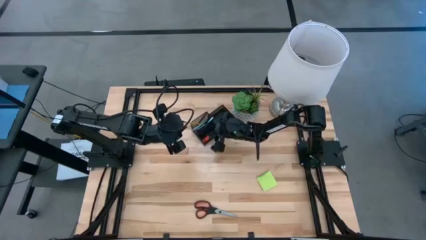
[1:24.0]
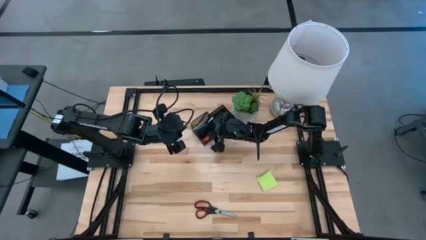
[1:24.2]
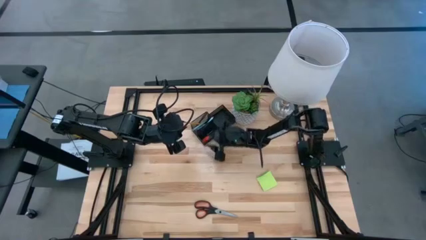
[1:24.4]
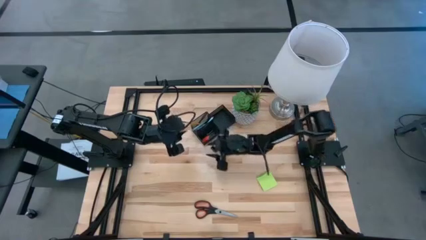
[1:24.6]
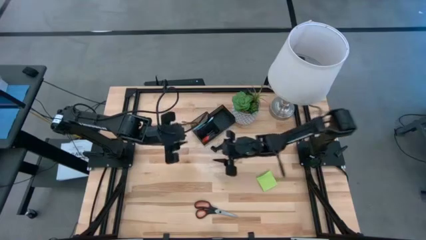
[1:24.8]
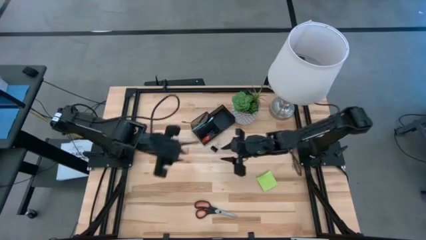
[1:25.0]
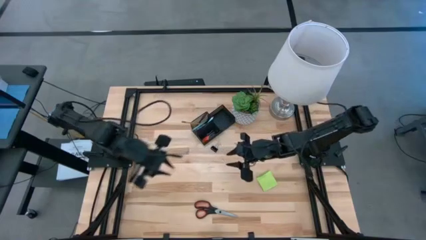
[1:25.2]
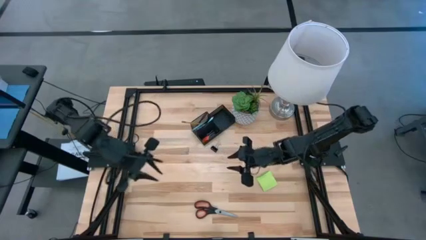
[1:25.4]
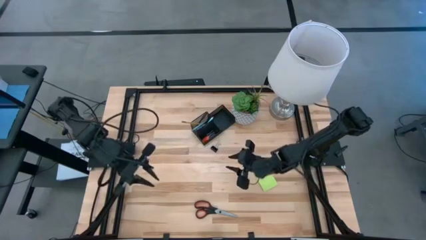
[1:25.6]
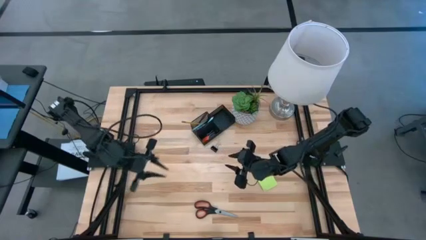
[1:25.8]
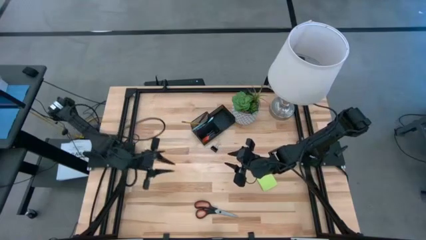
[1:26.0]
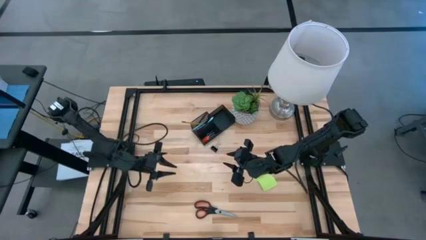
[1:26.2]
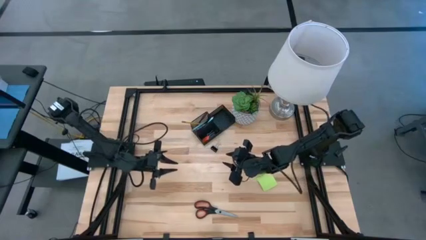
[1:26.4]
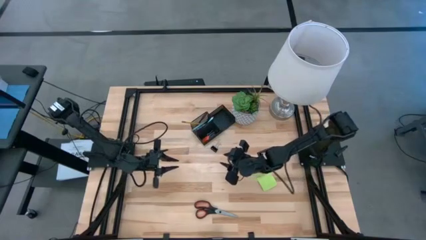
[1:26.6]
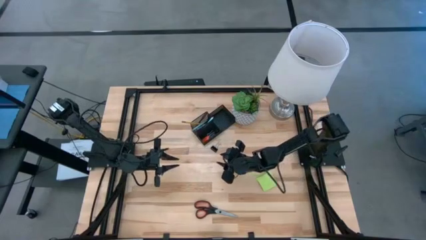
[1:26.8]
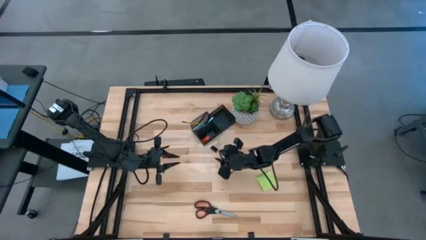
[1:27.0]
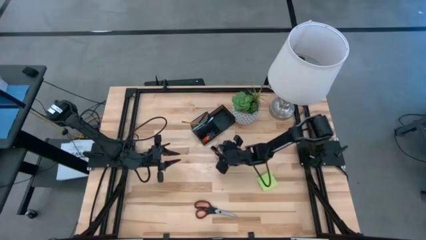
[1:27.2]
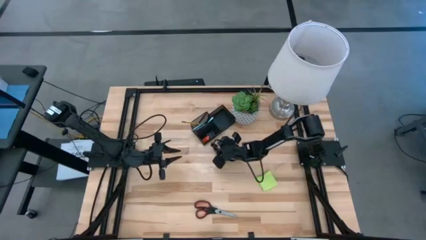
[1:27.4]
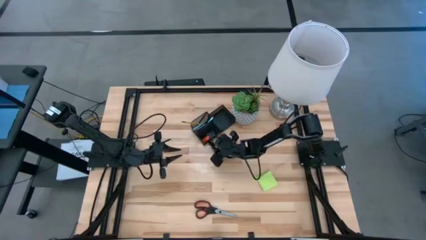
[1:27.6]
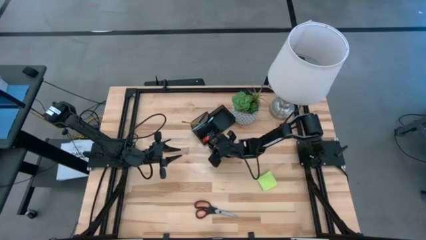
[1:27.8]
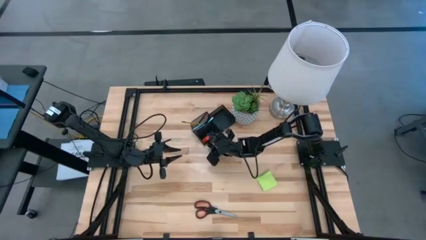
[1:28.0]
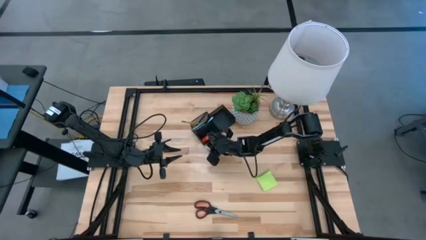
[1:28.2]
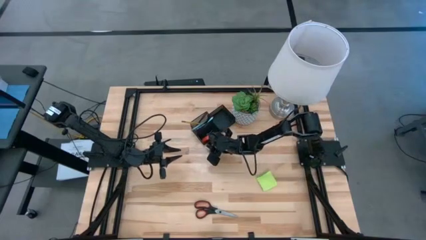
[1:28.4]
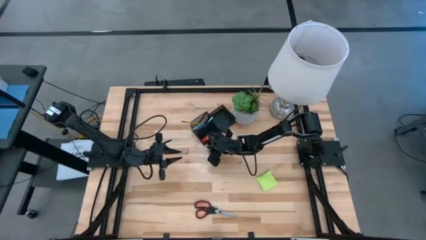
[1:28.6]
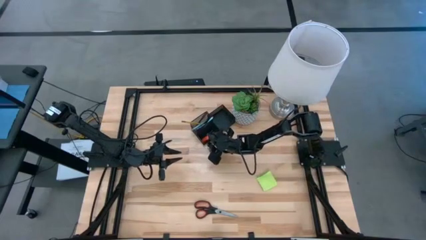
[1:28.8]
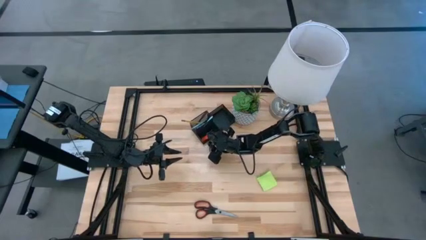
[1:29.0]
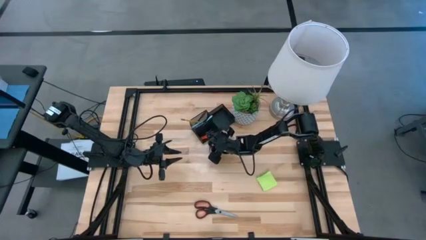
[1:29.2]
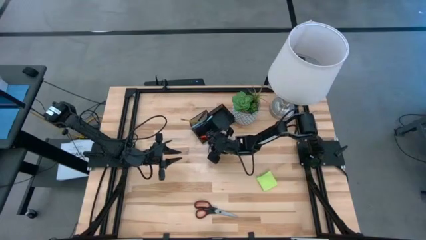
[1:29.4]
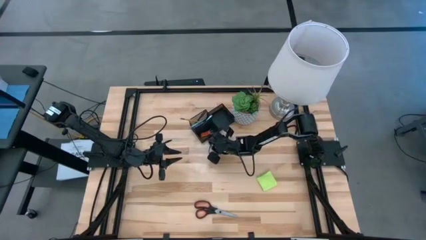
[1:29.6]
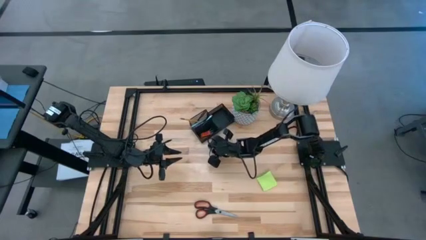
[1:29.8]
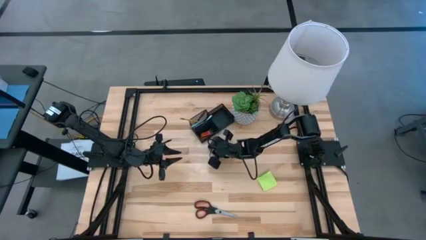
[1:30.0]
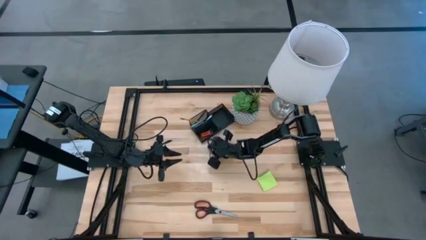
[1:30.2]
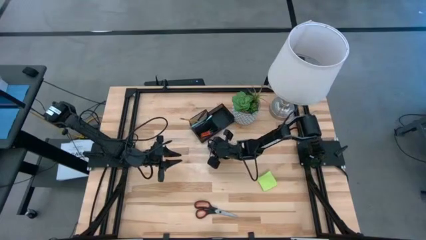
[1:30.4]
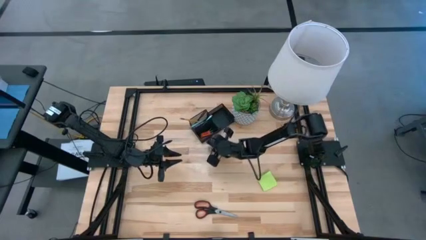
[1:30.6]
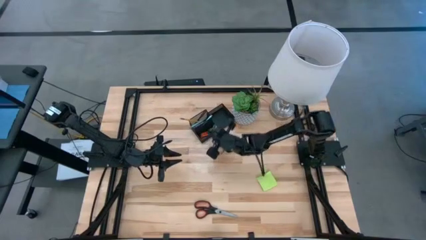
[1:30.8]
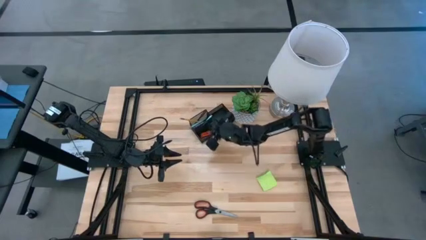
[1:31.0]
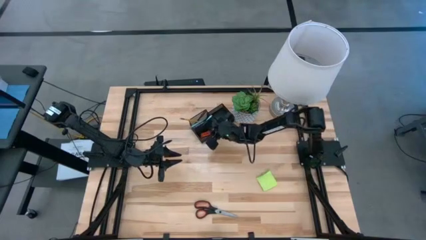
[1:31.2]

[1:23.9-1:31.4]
Task: Pick and place office supplies into organizer
Put the black binder clip into the black desk organizer

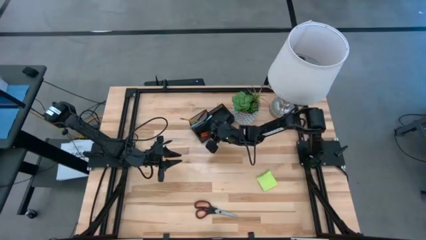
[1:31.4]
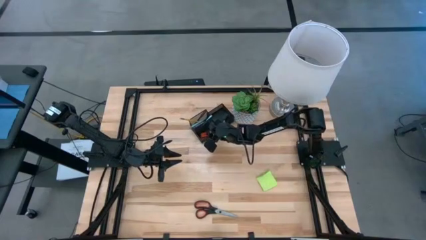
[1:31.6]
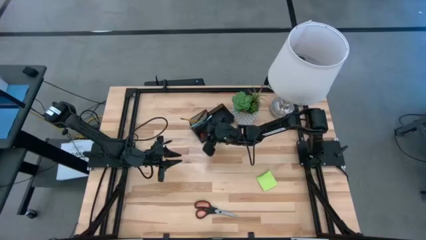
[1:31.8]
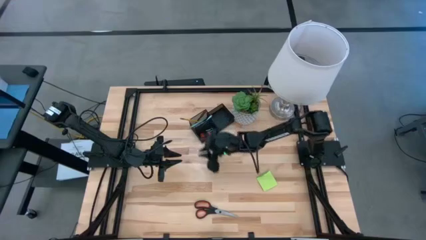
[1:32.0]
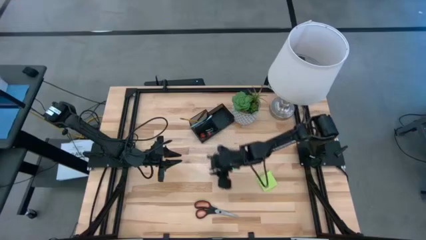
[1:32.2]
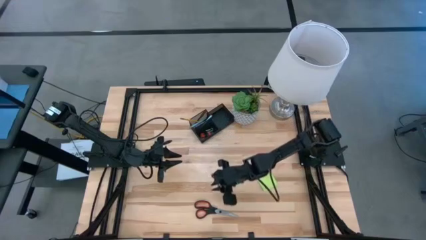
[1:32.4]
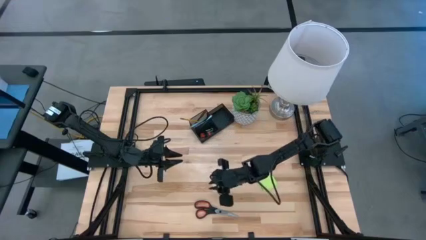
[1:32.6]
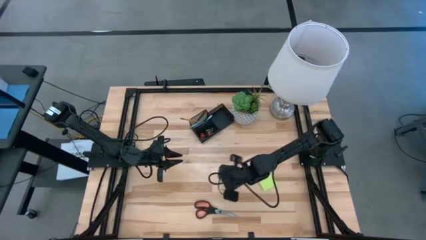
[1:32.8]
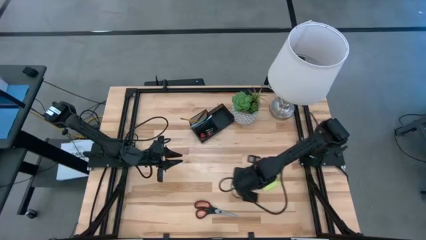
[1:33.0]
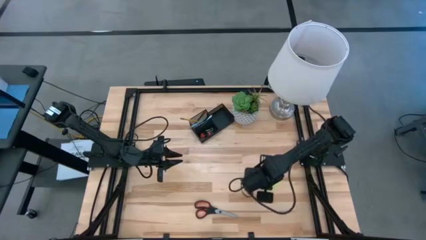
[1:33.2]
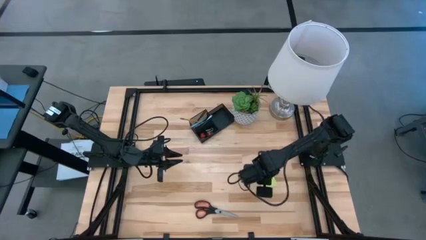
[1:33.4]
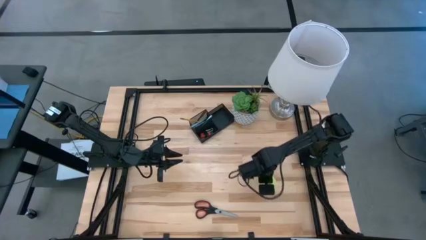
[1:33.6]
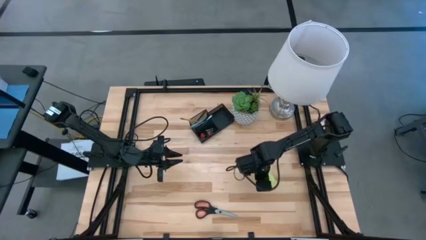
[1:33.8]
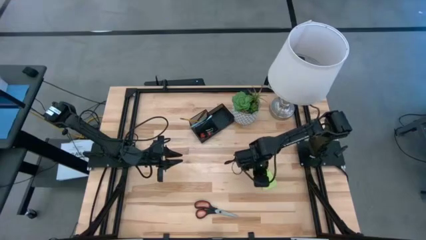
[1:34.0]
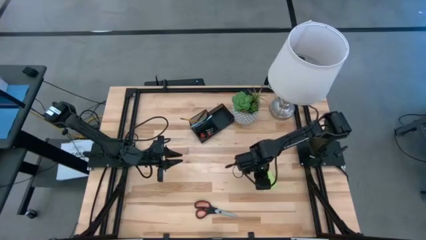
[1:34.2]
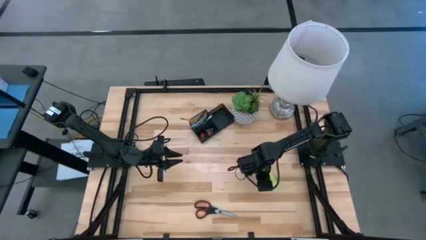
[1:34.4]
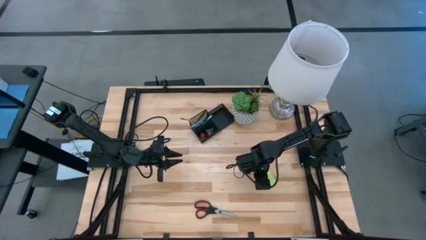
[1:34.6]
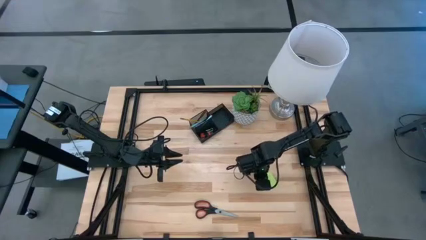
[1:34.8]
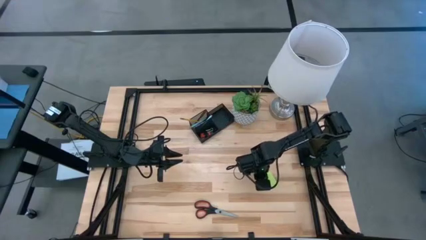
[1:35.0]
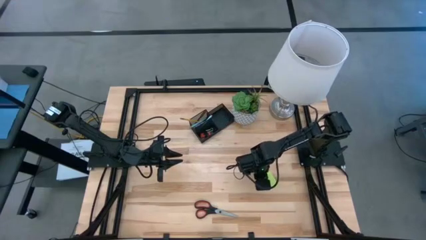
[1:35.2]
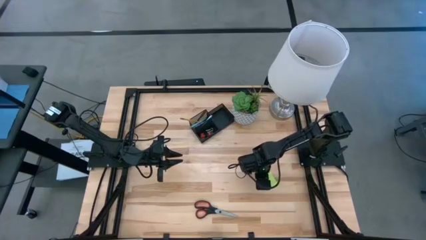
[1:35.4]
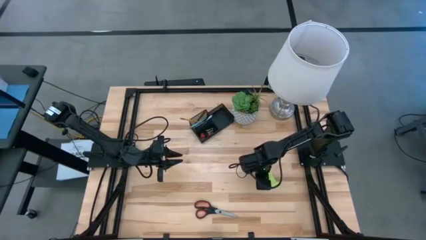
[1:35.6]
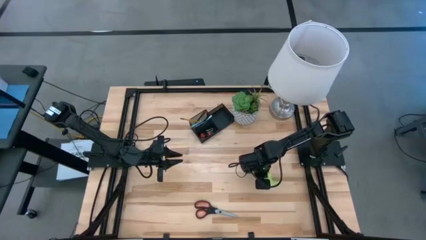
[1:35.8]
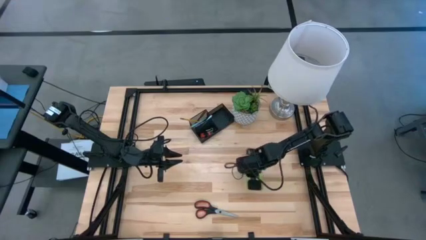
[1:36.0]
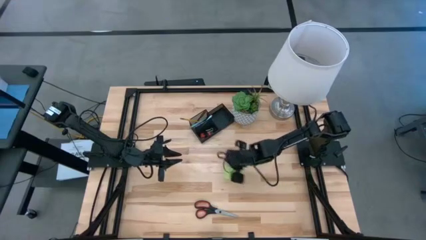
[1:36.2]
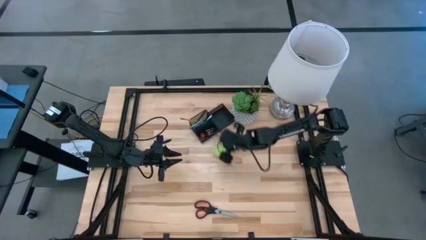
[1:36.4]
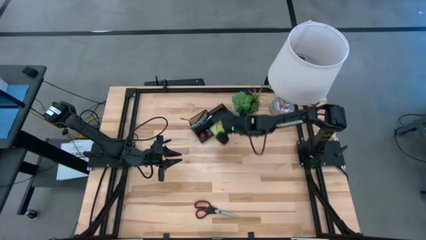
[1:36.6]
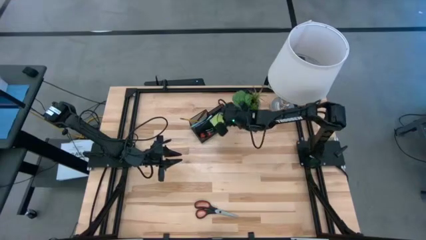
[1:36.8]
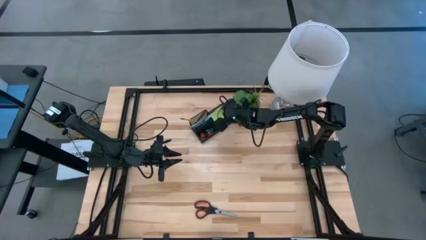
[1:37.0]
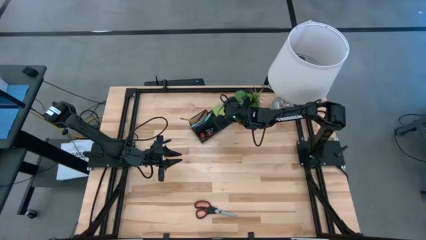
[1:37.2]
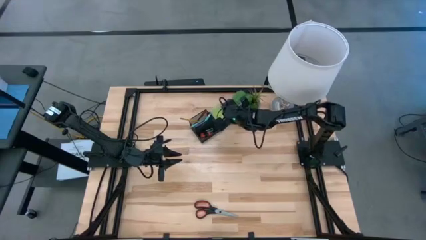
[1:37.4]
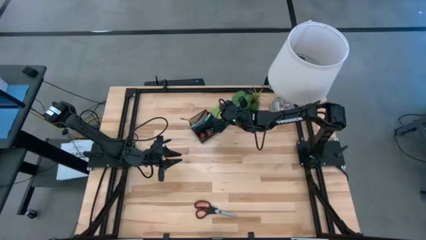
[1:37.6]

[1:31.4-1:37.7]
Put the green notepad into the black desk organizer
